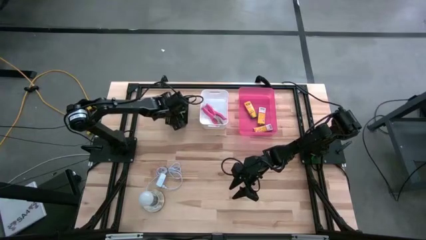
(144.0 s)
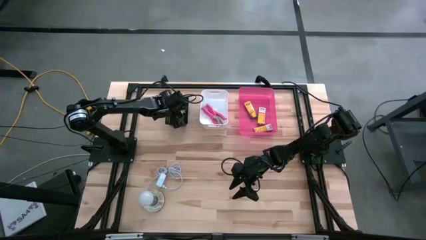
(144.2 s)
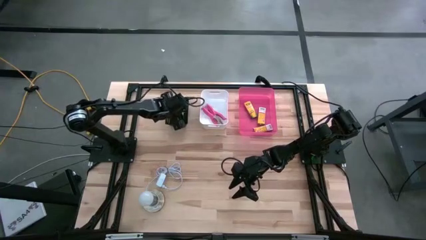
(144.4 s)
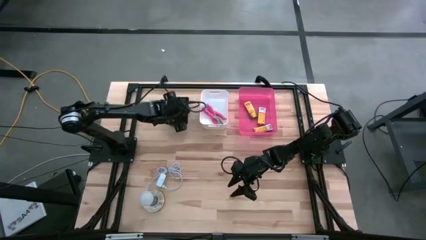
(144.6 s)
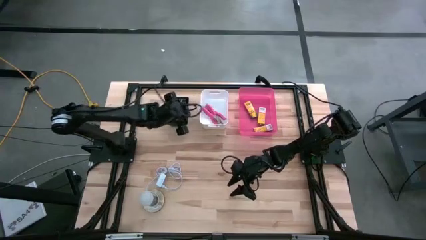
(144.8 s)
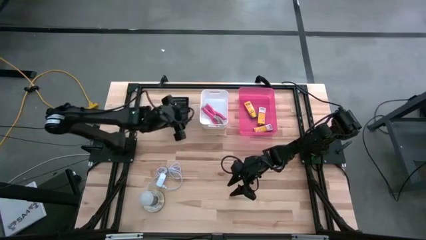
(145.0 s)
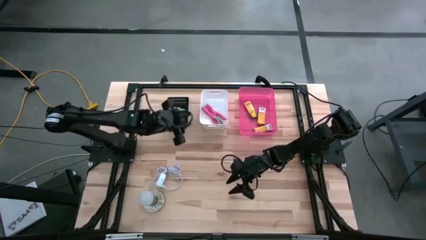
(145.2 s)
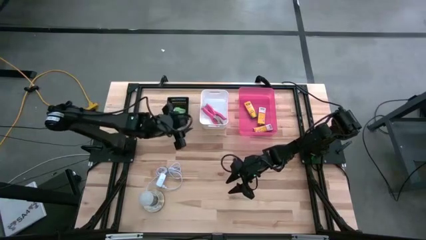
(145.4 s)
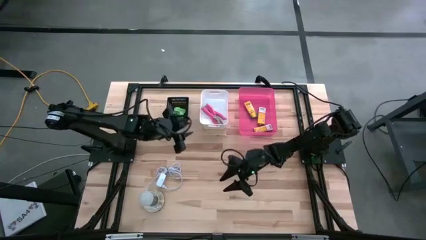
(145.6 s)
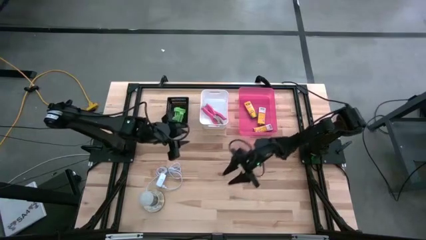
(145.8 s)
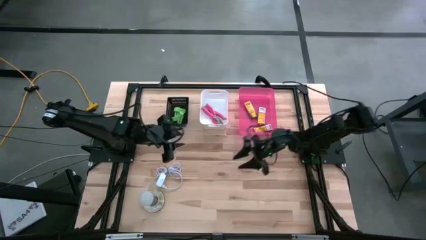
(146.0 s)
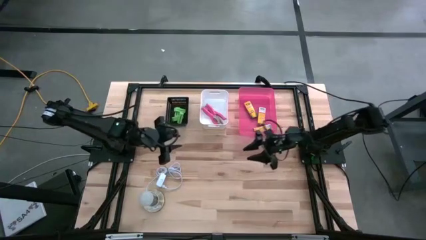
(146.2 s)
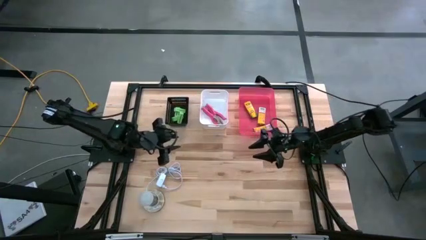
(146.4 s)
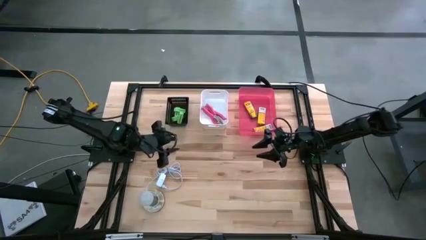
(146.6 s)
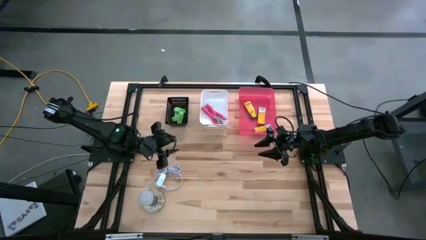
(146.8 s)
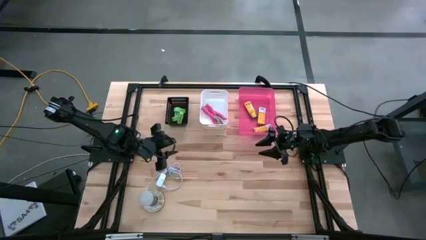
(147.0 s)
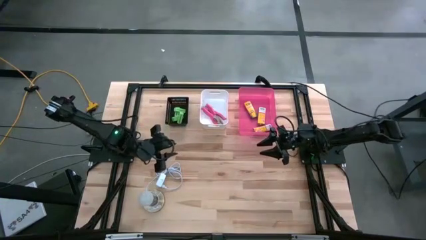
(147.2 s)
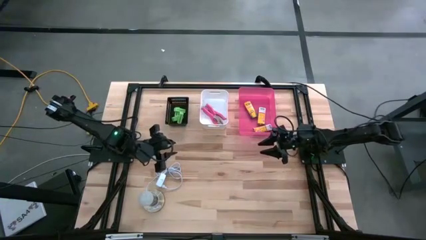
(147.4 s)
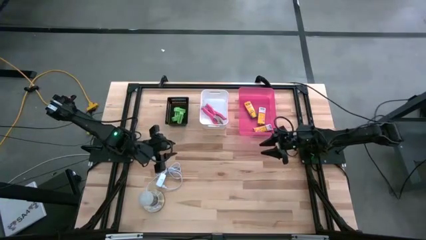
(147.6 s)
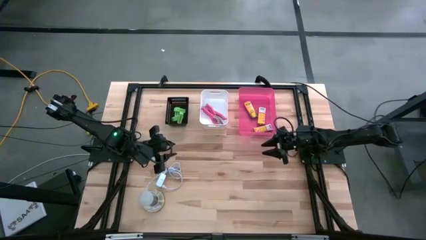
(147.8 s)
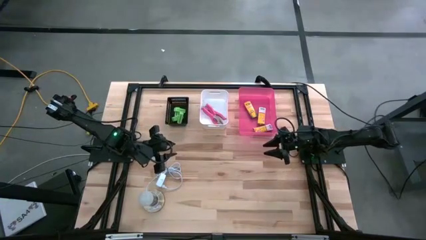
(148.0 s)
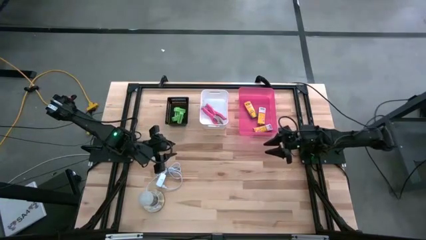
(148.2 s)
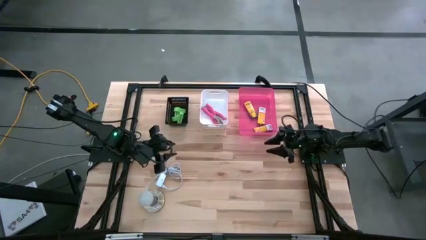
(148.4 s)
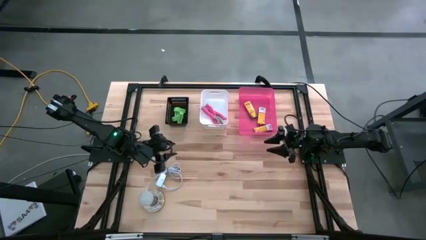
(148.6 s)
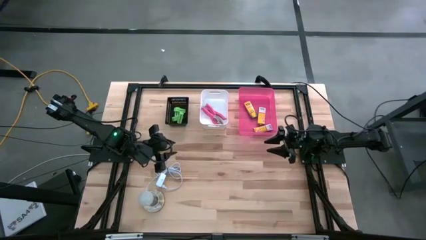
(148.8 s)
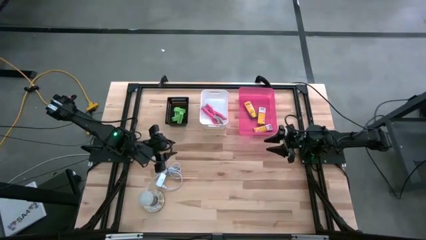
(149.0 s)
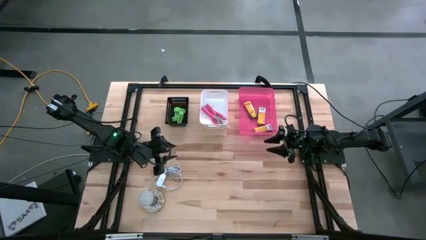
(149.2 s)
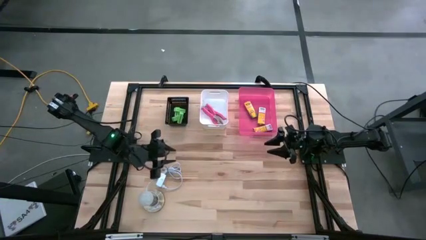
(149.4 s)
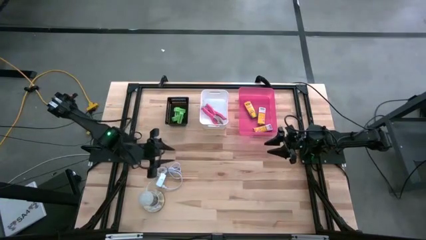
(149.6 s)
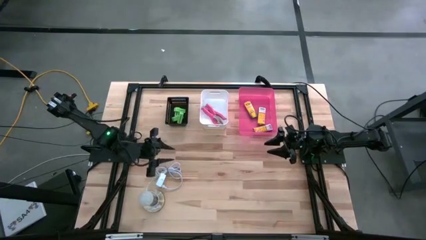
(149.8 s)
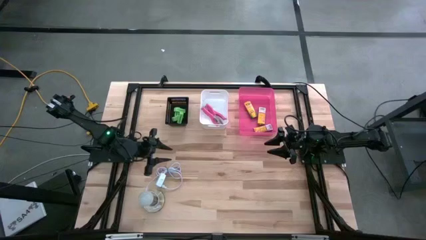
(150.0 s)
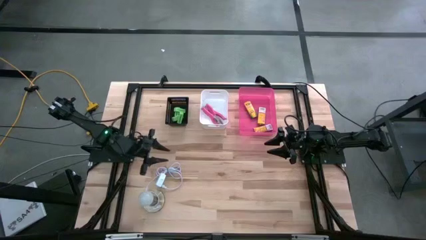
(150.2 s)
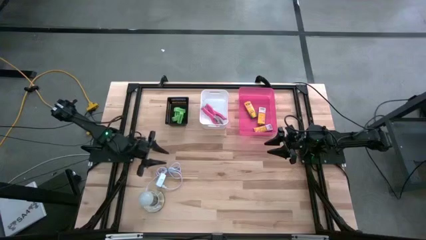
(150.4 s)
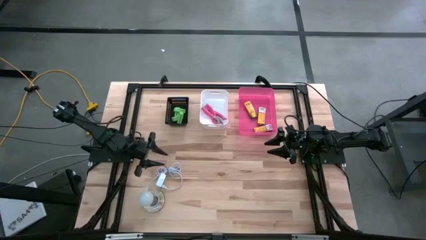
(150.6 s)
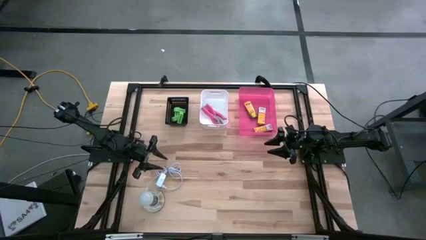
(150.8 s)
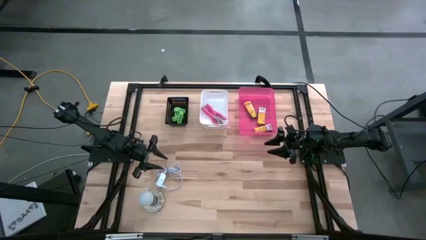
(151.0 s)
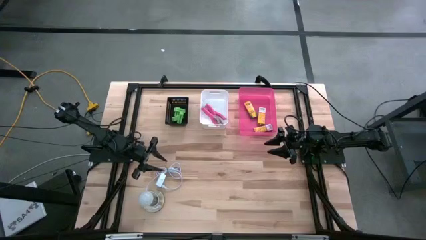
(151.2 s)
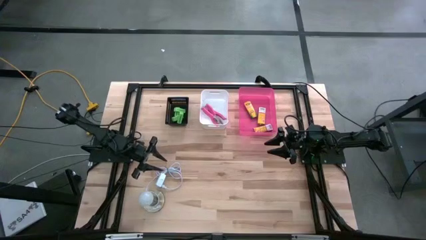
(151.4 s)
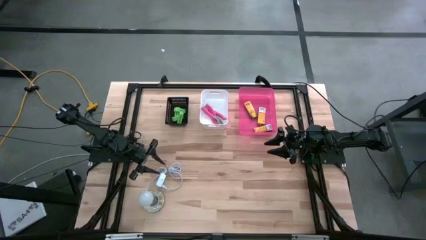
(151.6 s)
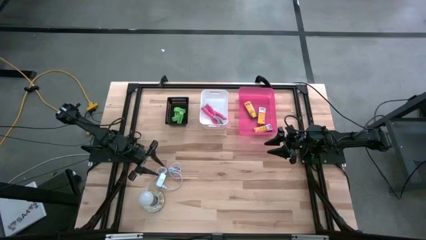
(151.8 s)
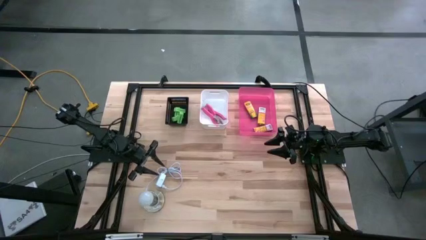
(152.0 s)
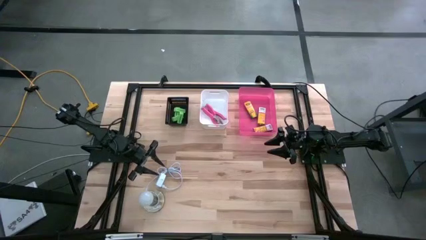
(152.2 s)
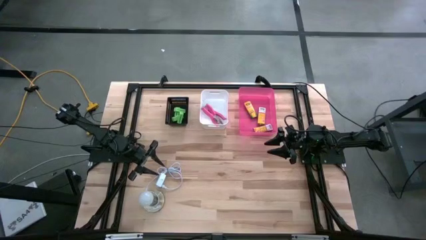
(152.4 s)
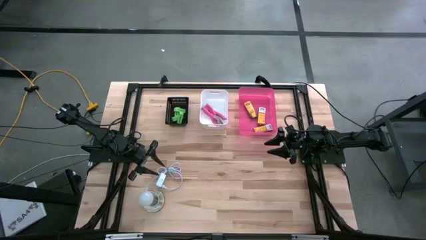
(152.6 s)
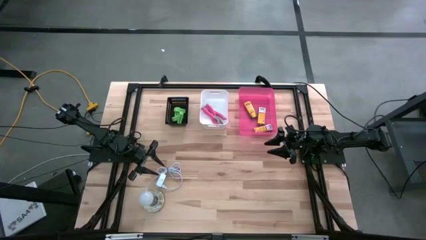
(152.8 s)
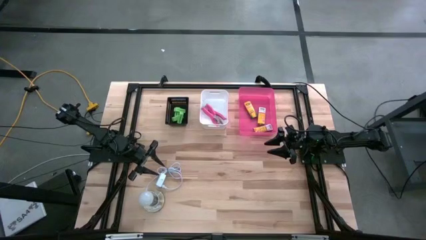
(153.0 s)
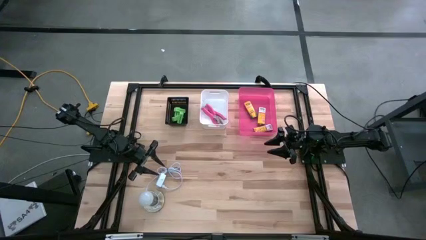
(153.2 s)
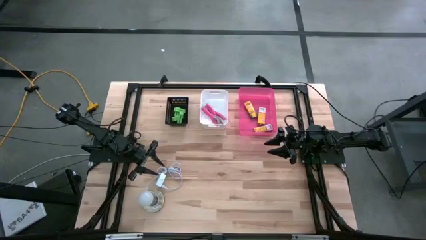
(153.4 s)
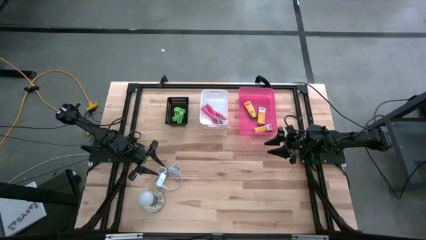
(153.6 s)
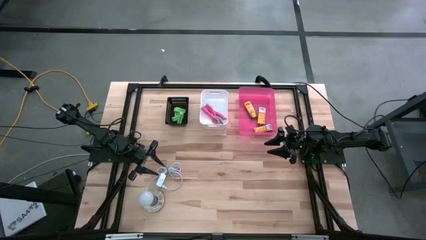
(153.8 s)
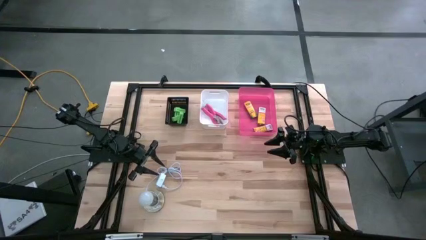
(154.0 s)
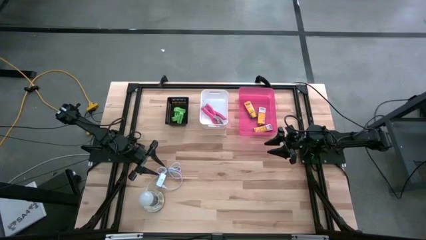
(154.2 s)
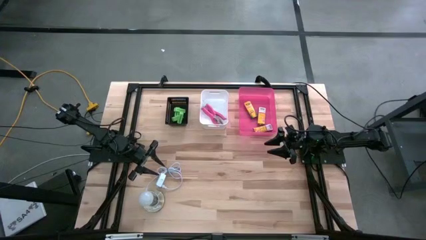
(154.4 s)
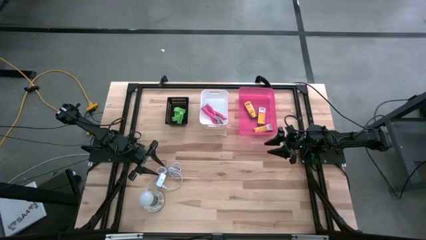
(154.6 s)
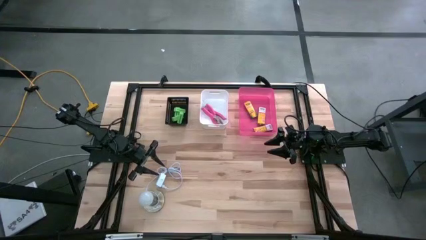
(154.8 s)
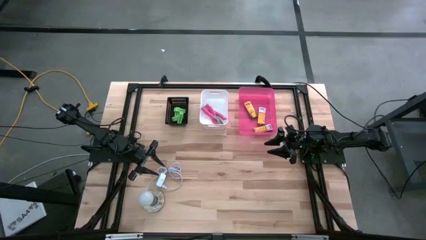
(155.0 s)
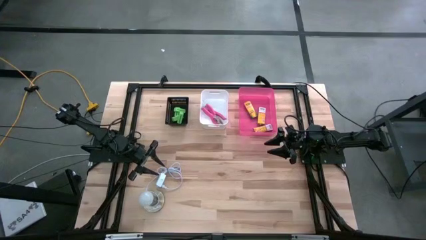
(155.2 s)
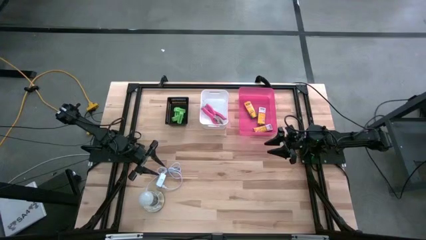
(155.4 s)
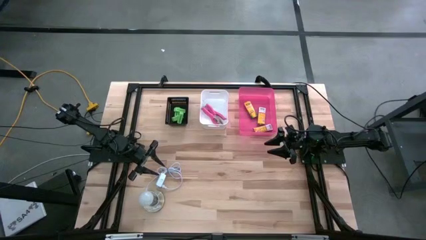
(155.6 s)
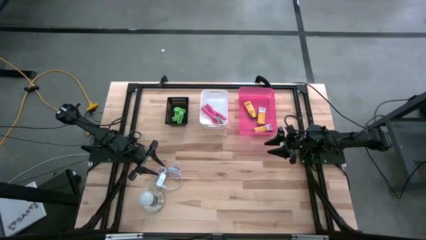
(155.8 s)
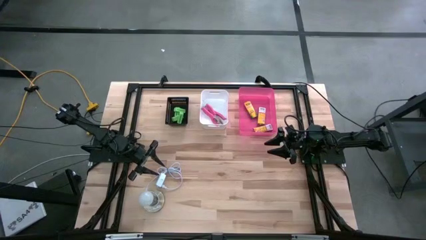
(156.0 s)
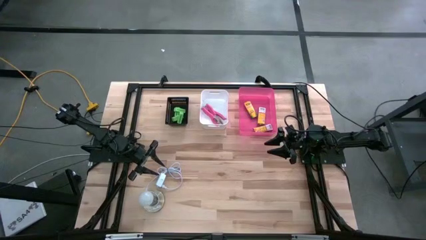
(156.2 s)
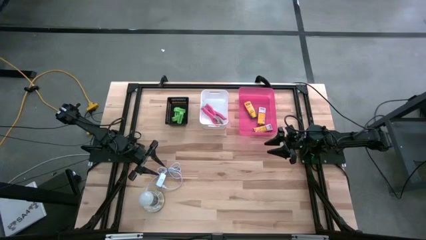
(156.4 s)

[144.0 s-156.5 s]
Task: Pick & Place School Supplies
Return to Home Position
